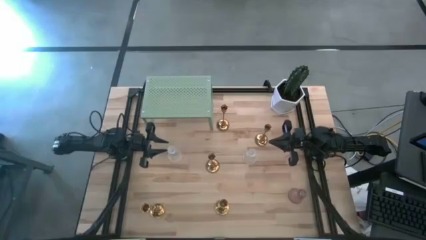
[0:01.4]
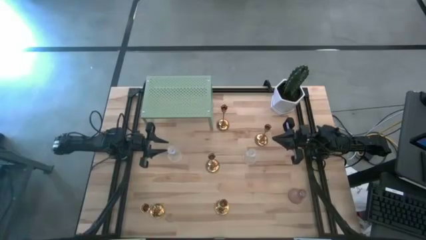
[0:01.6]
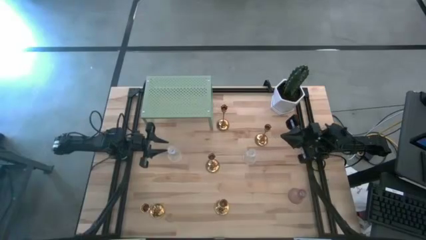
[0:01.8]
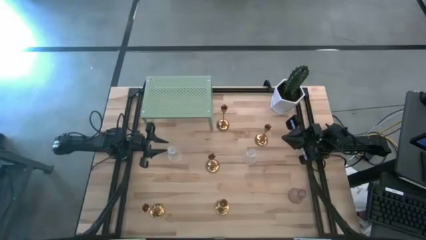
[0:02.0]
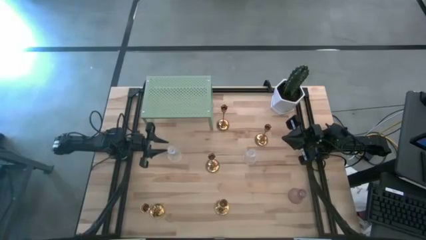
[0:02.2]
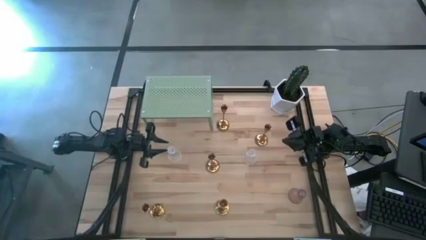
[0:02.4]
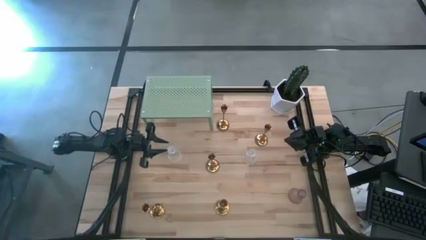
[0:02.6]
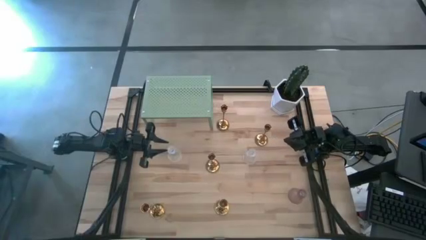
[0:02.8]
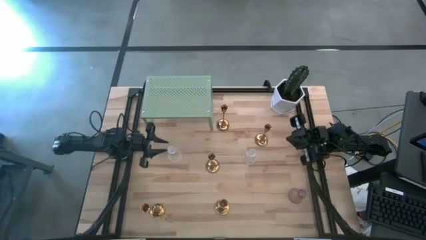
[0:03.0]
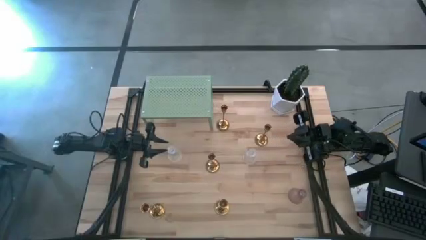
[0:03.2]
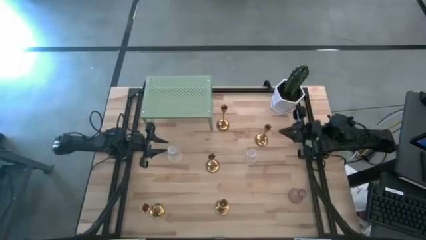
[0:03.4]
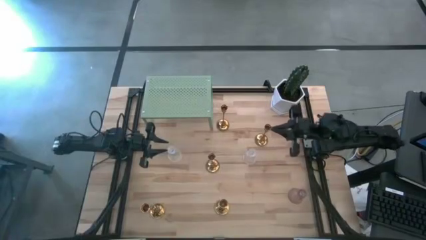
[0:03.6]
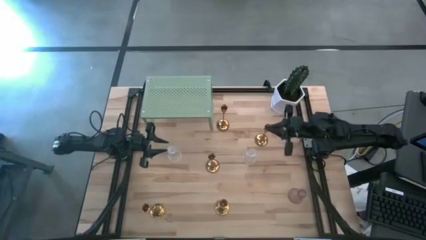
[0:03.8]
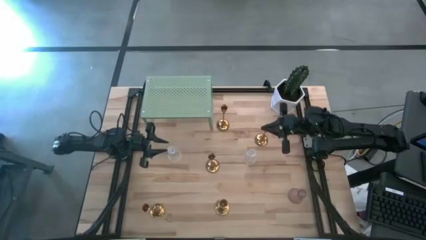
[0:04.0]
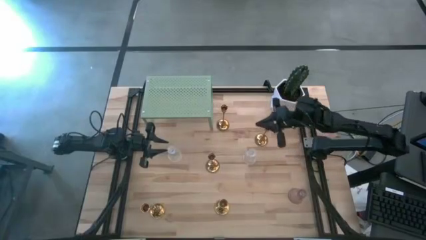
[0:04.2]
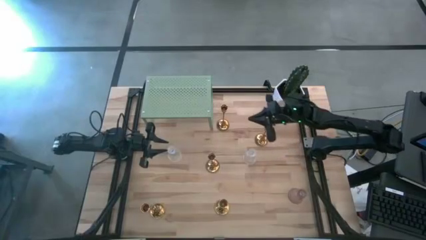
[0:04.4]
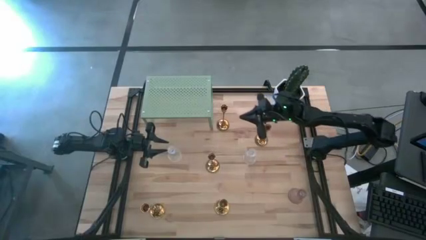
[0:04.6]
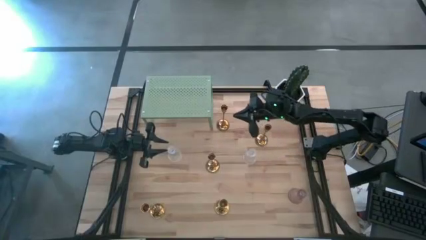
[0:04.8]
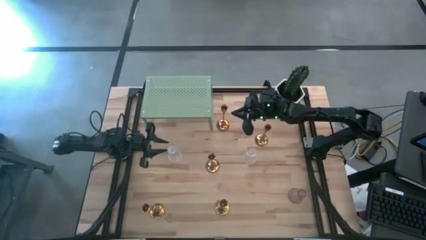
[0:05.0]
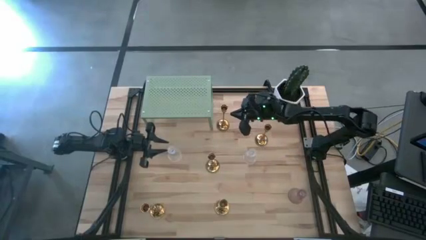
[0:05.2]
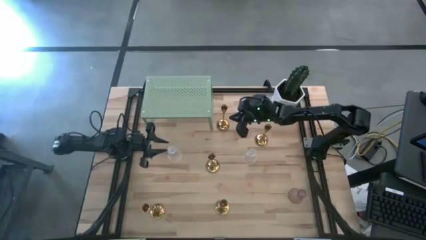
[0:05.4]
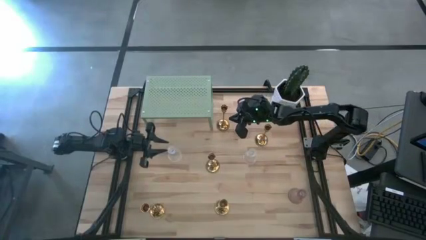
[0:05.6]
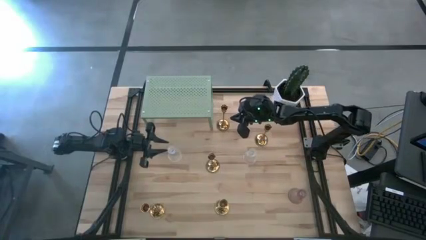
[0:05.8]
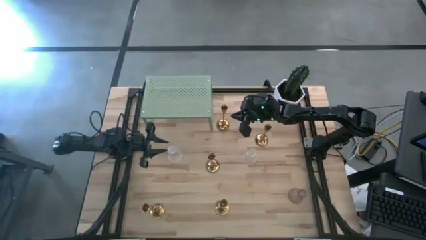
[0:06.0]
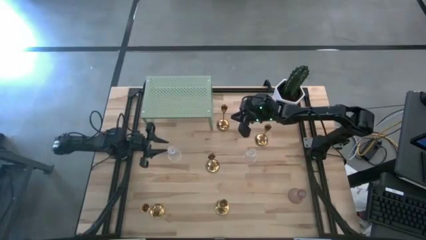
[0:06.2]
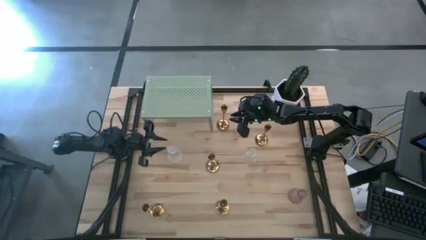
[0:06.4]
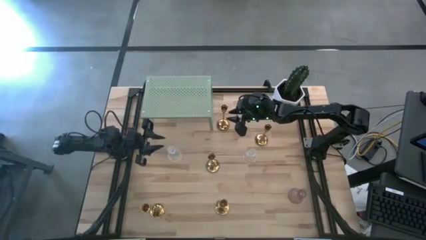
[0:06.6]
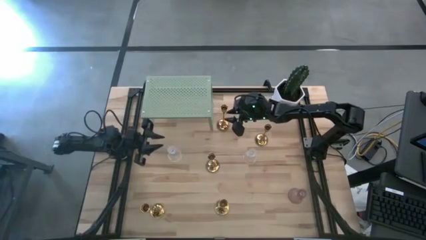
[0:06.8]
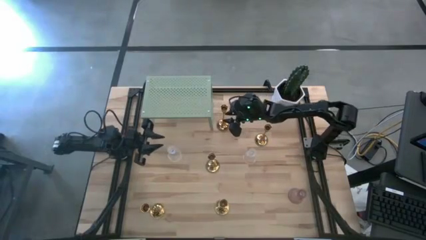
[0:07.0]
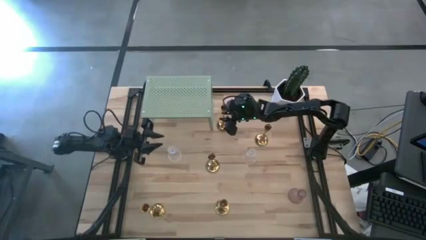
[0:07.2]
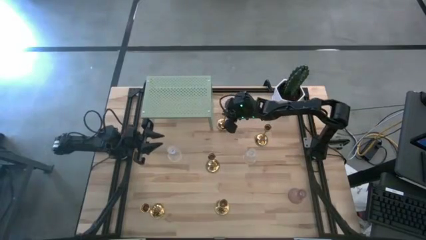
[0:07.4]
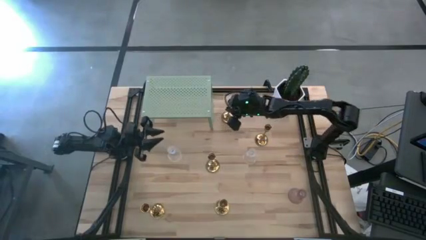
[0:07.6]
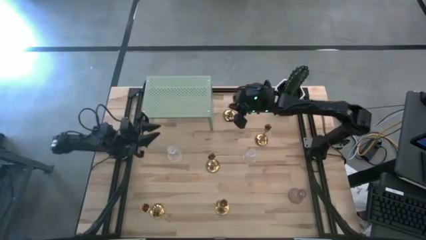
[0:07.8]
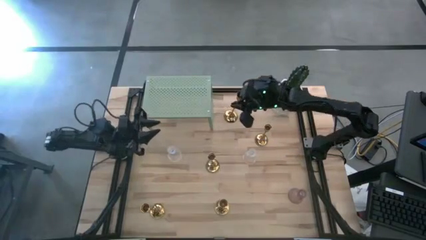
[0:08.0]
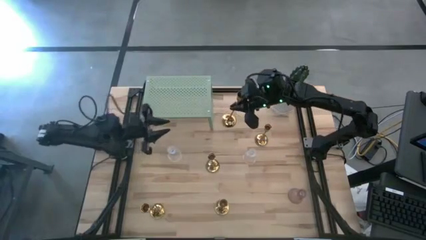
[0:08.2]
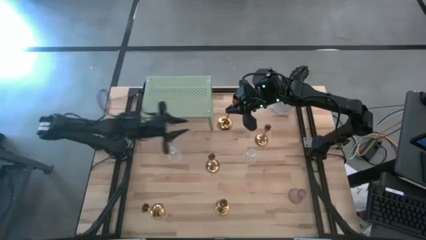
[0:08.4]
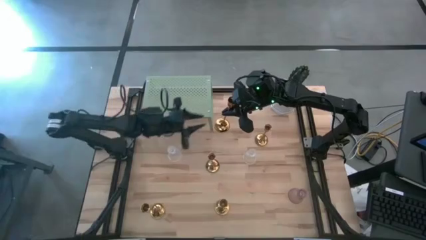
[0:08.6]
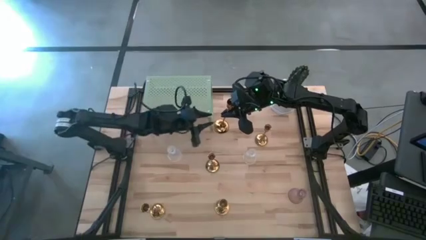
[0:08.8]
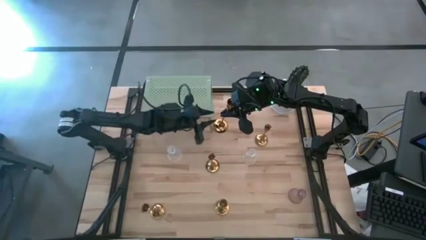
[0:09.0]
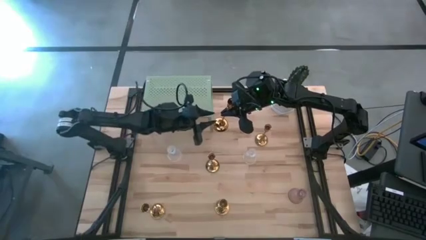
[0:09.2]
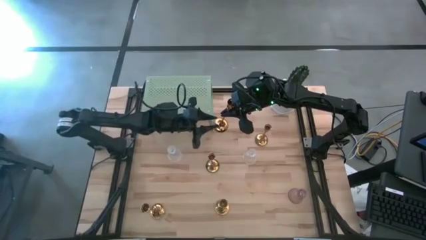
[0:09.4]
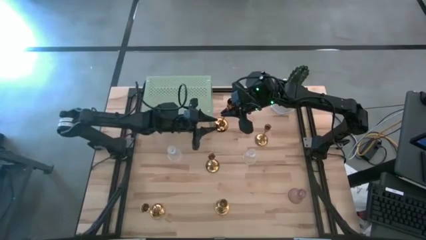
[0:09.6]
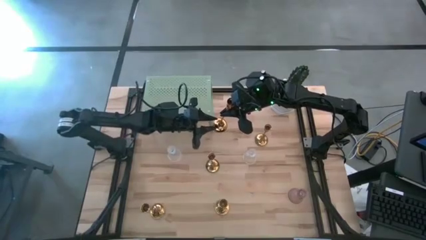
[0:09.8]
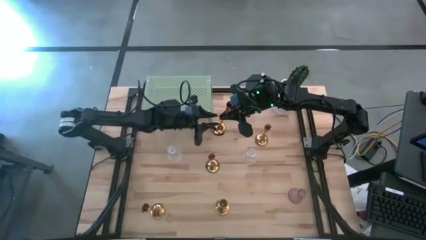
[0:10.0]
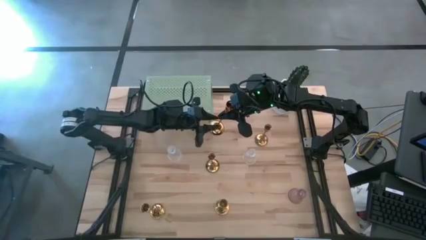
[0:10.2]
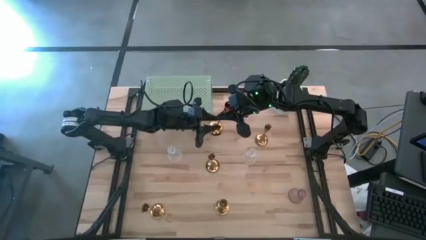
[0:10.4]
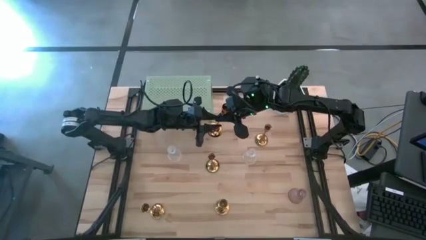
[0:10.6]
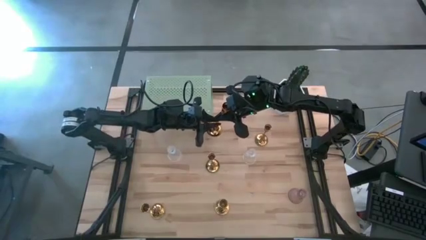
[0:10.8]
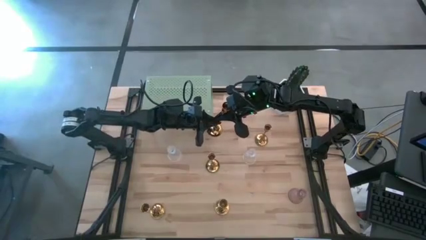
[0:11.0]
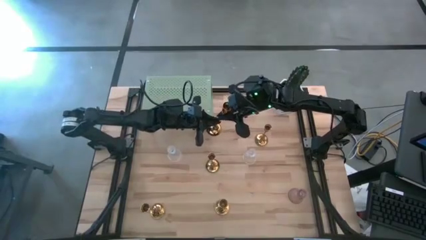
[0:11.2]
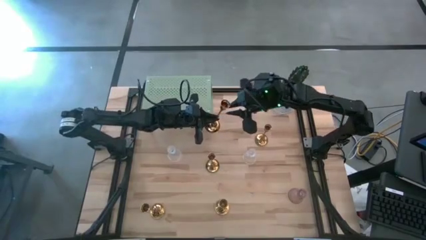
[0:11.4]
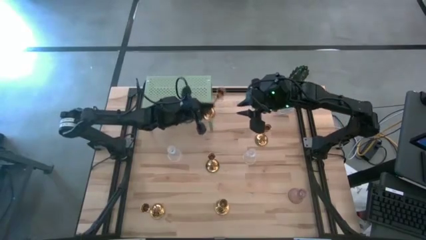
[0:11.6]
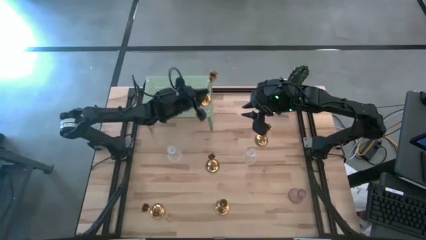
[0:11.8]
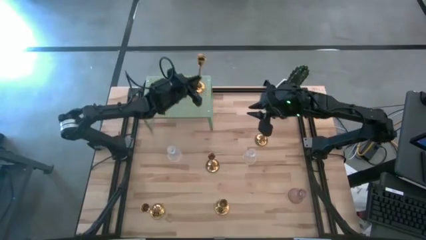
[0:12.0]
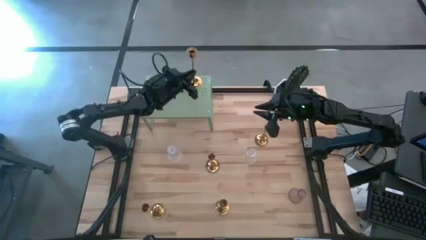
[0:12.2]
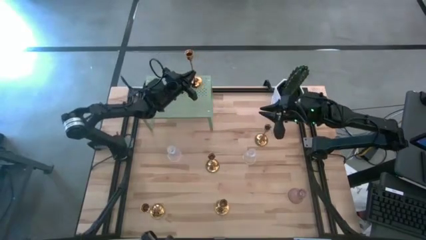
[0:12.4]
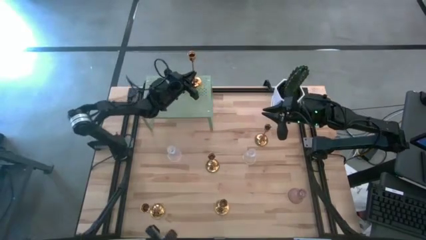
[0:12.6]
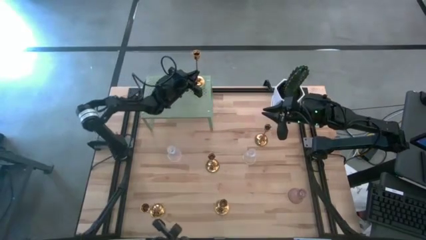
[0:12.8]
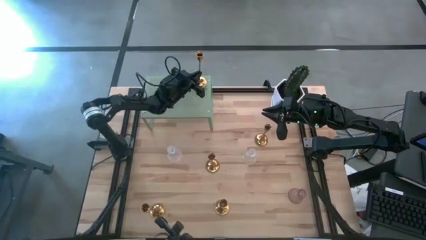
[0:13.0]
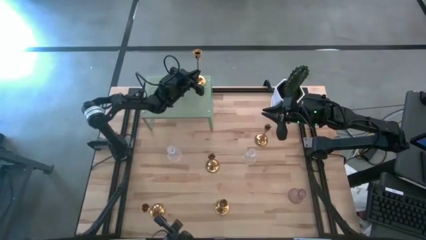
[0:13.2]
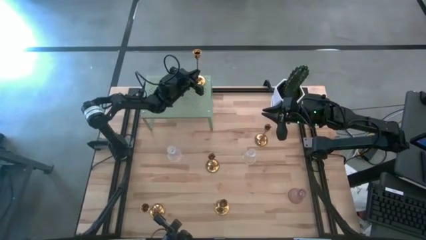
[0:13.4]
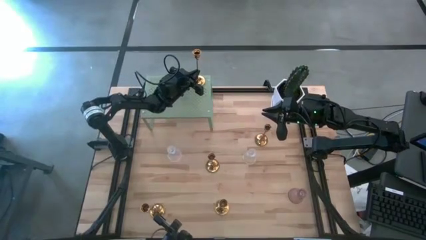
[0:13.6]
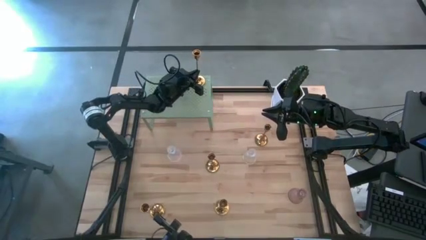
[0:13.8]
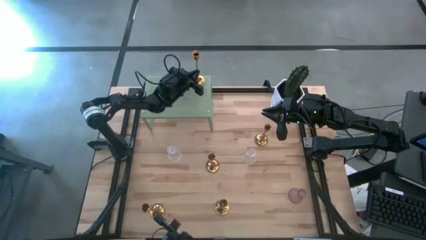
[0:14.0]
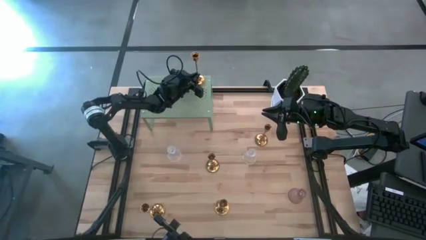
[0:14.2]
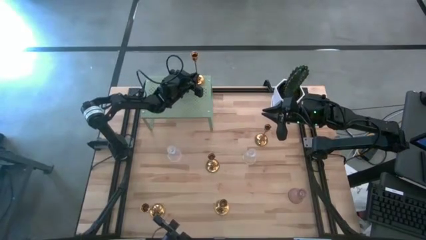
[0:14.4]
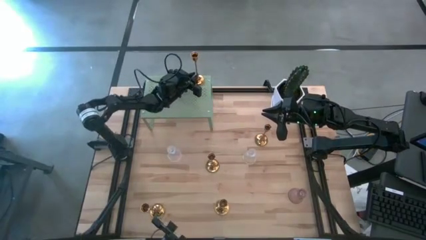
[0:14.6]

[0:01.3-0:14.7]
Task: Pick & Place candle stick holders
Put the candle holder on the shelf
